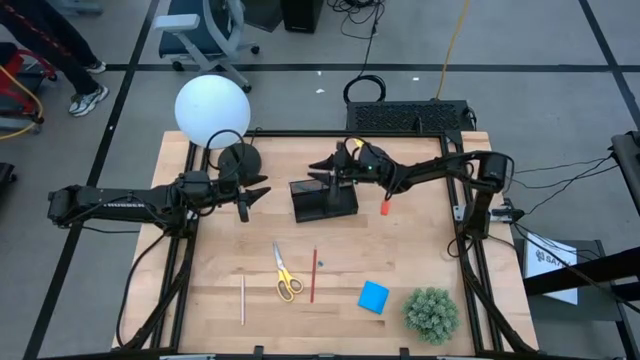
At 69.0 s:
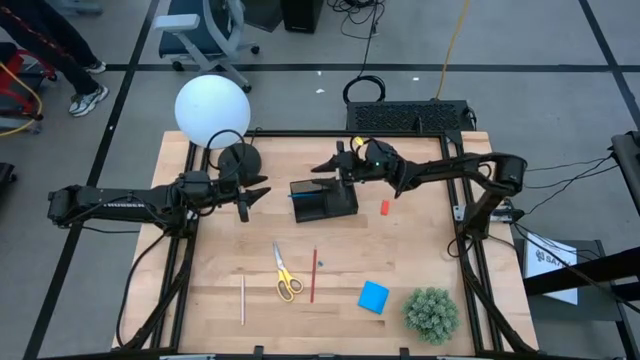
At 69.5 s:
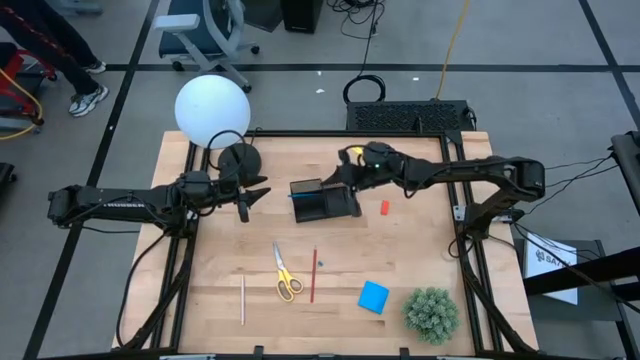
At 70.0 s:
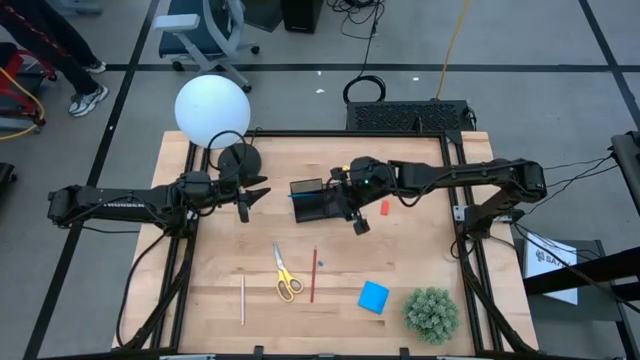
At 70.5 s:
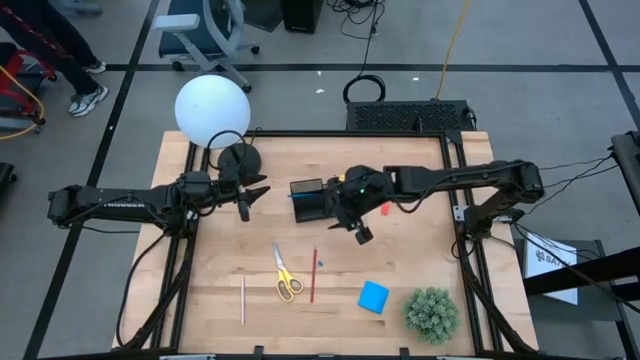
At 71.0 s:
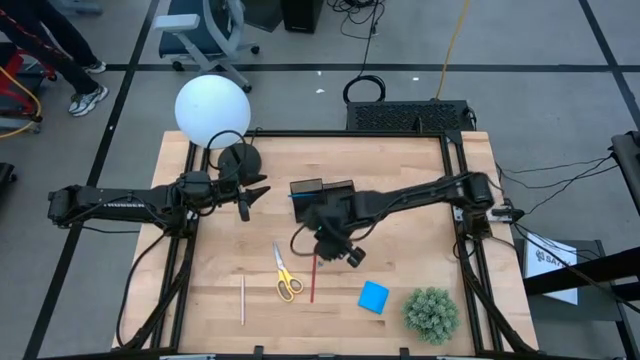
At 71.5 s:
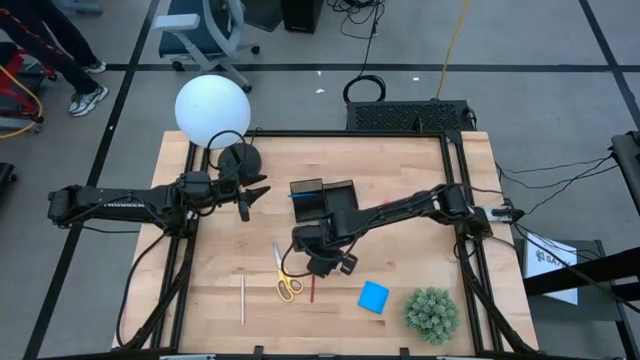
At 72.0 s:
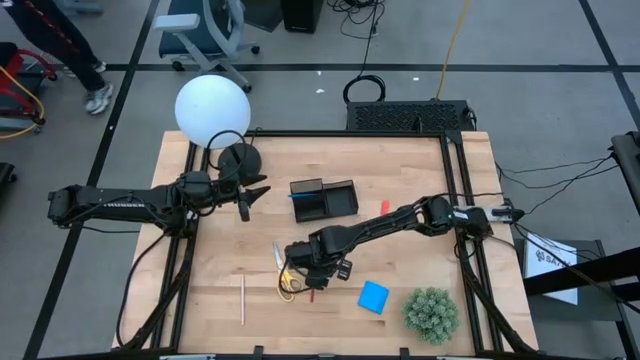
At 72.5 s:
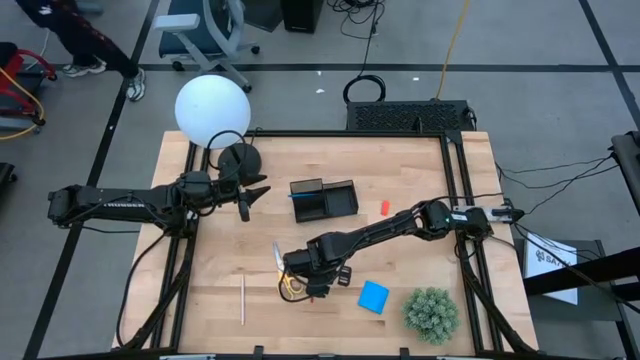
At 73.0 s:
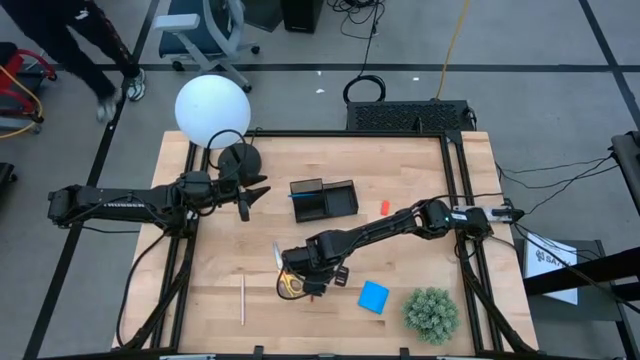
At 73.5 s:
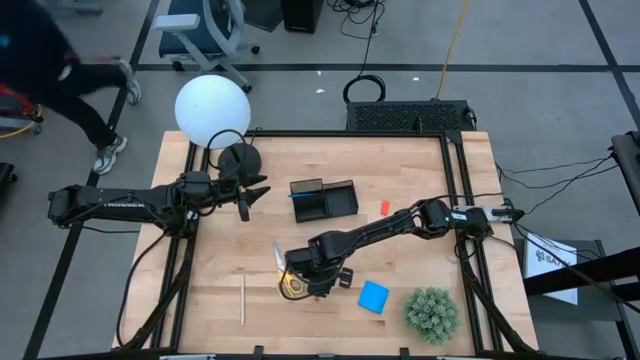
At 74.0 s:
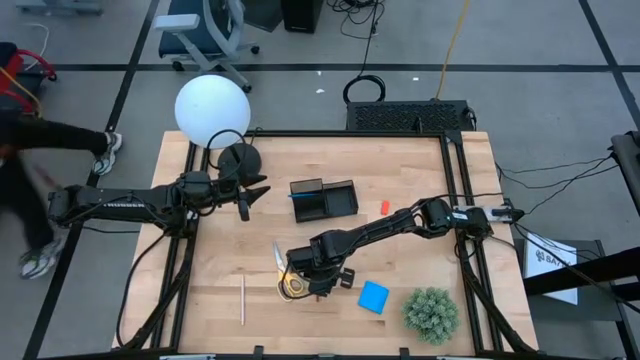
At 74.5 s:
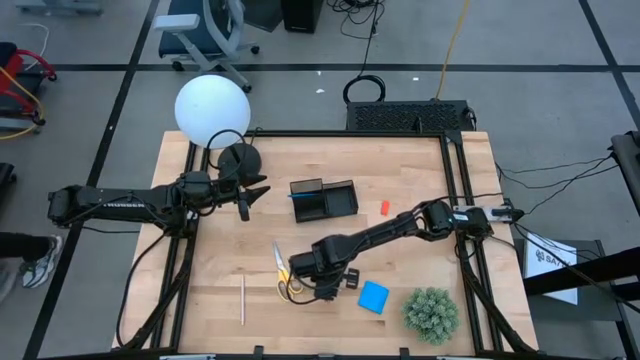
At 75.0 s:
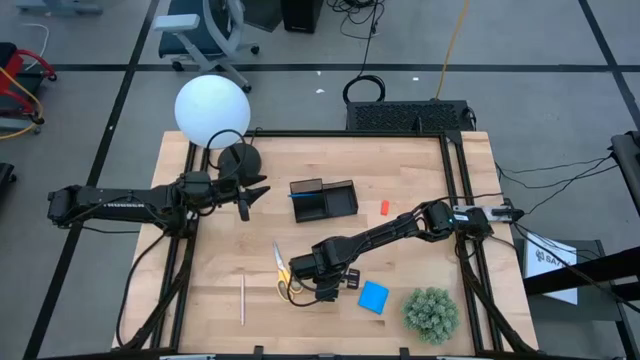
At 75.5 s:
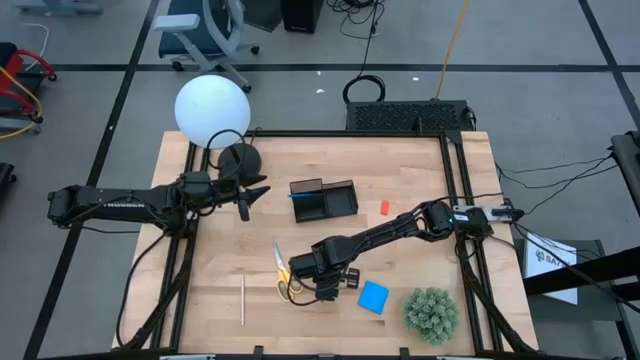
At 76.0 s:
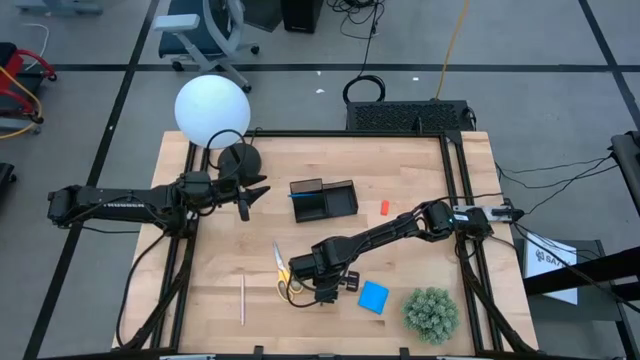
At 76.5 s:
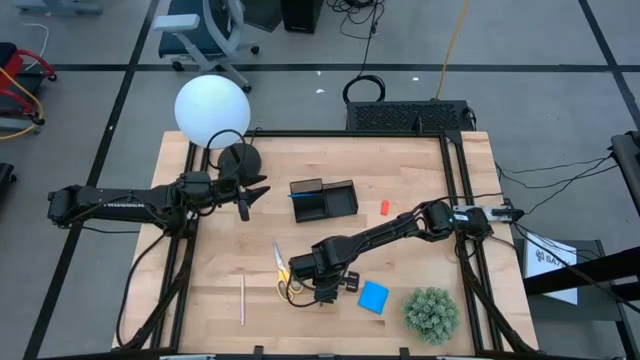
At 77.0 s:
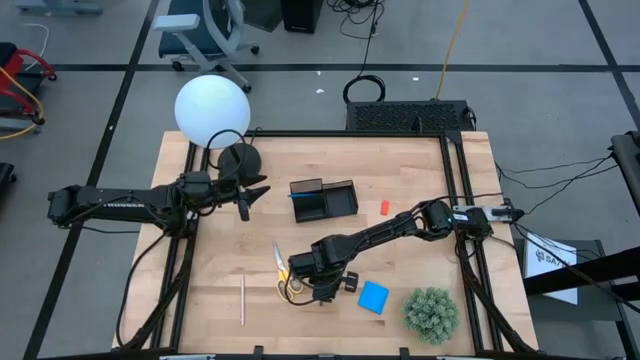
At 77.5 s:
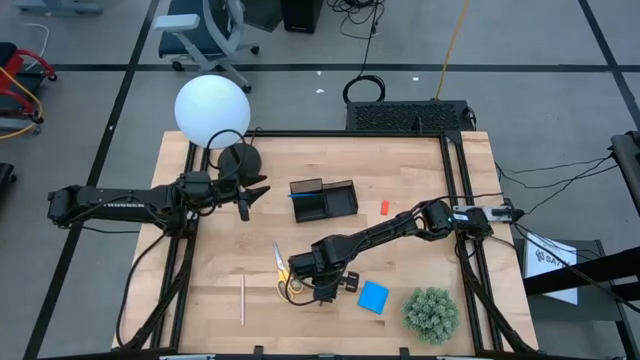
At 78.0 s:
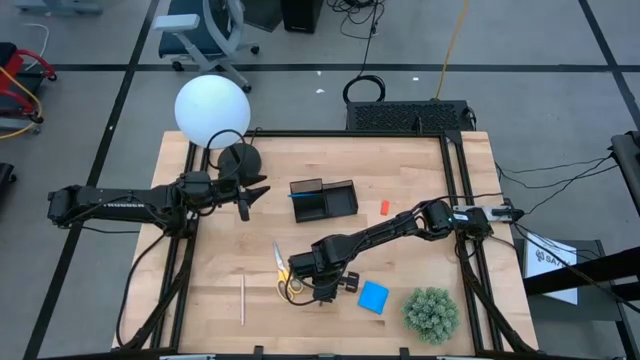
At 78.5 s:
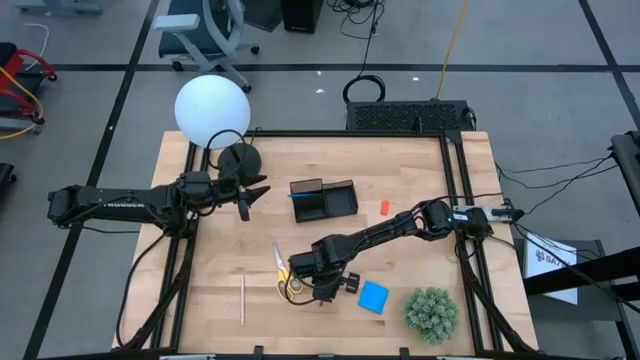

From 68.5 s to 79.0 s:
Task: Pick and place office supplies into organizer
Put the red pencil into the desk organizer

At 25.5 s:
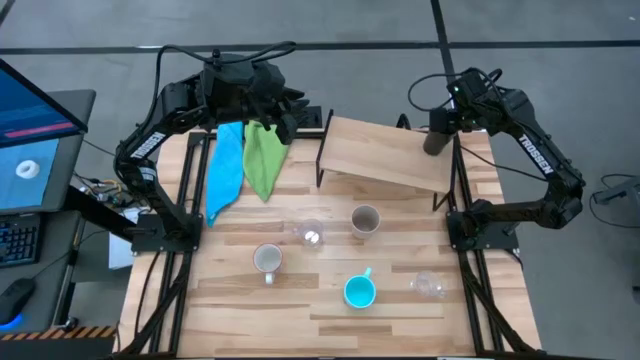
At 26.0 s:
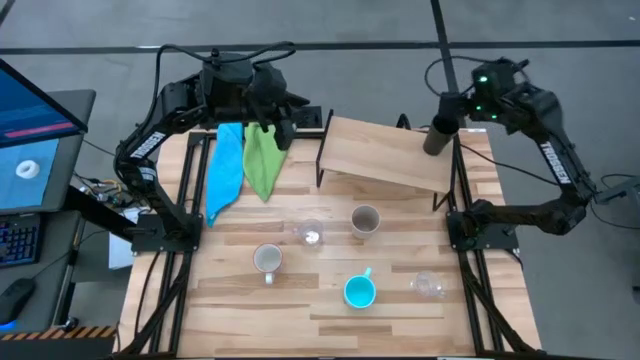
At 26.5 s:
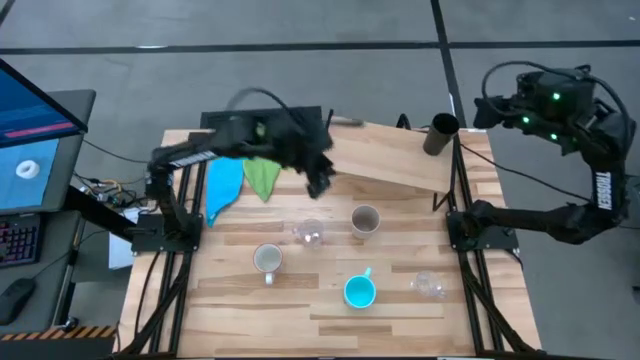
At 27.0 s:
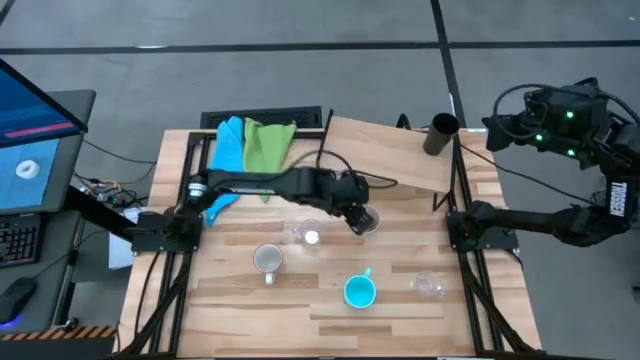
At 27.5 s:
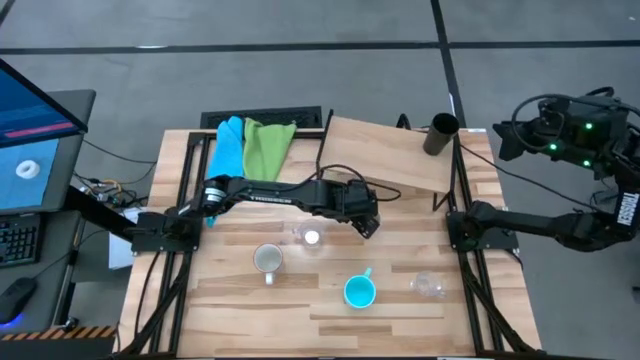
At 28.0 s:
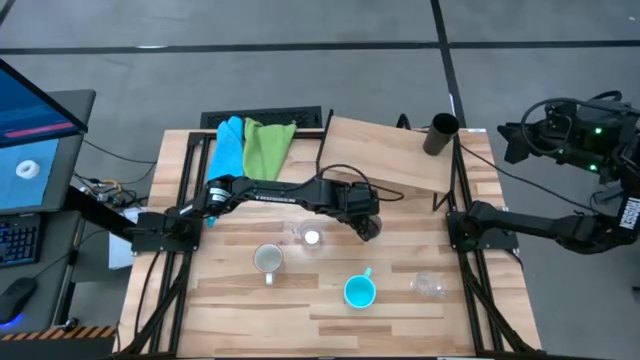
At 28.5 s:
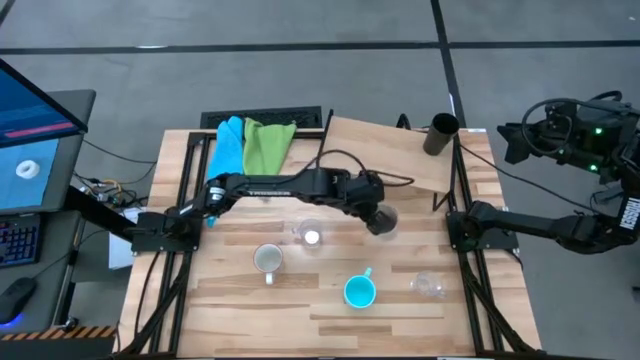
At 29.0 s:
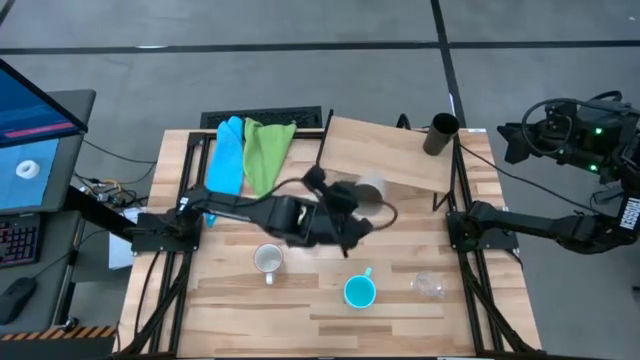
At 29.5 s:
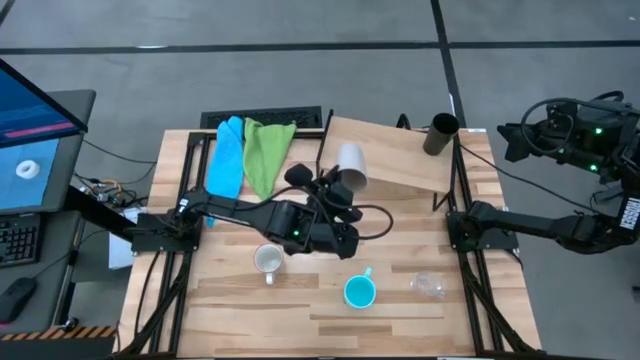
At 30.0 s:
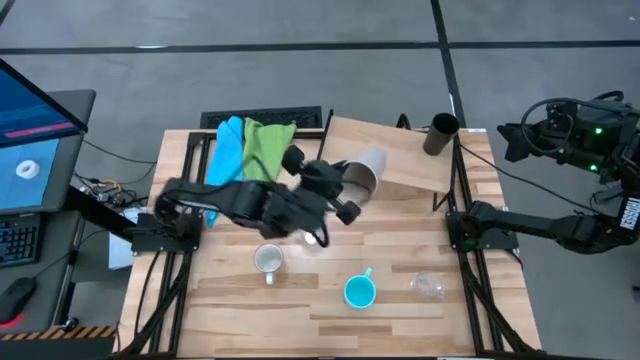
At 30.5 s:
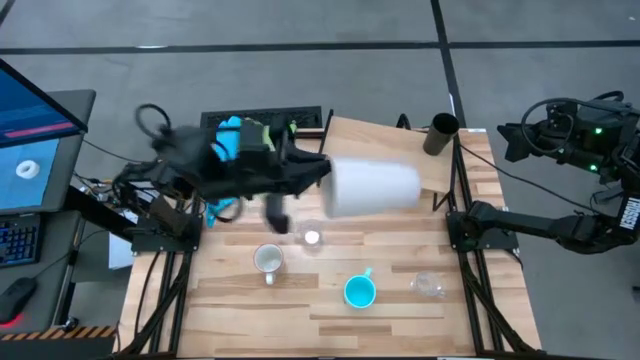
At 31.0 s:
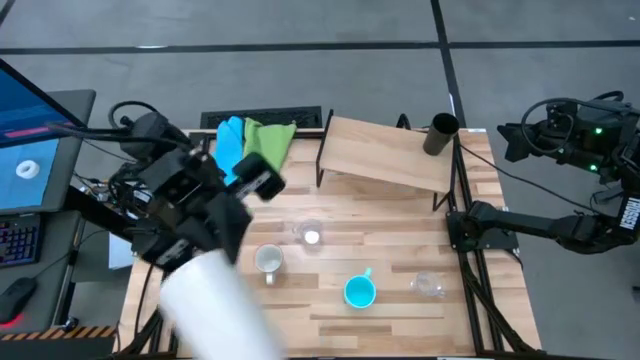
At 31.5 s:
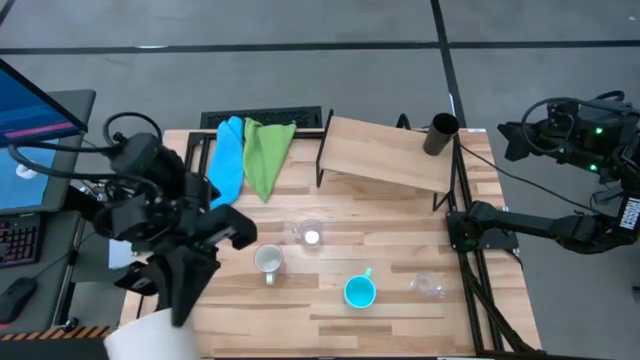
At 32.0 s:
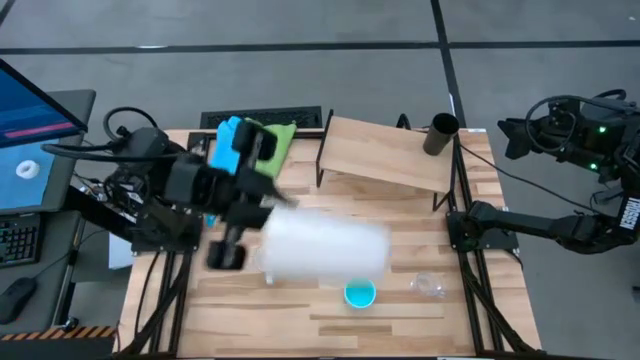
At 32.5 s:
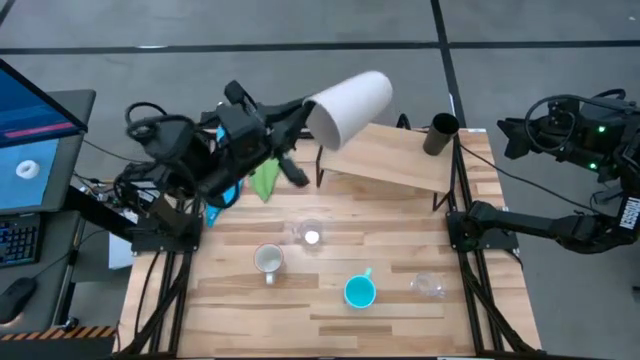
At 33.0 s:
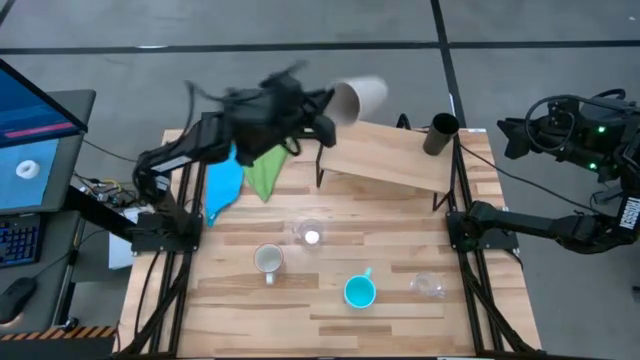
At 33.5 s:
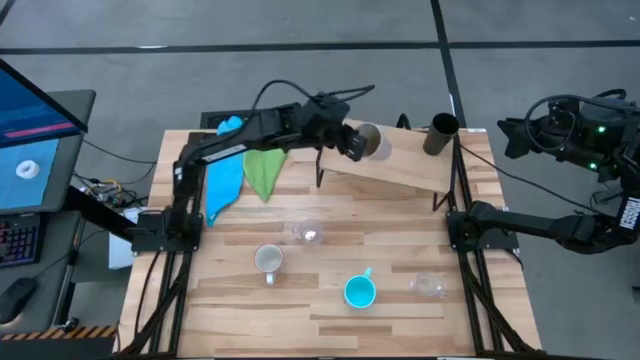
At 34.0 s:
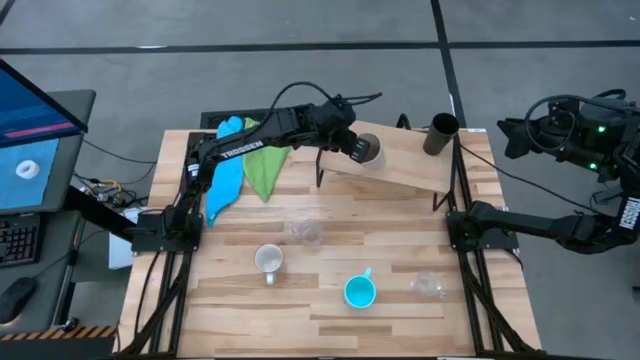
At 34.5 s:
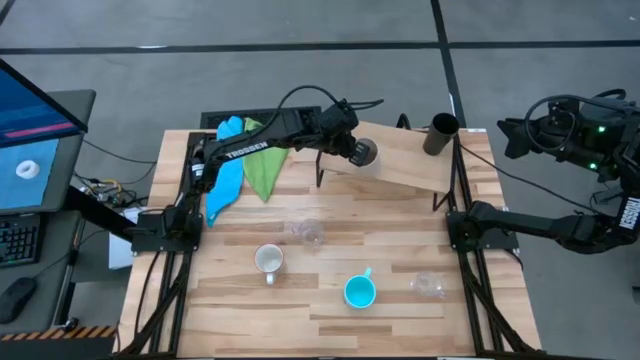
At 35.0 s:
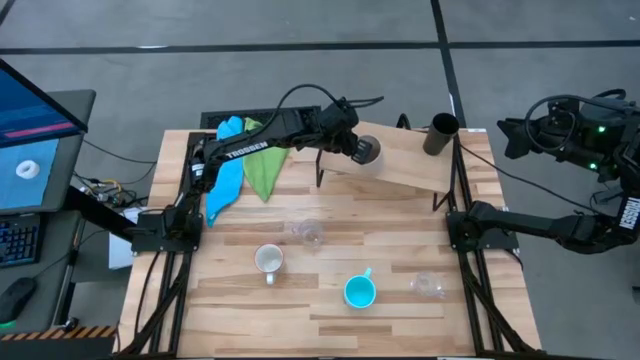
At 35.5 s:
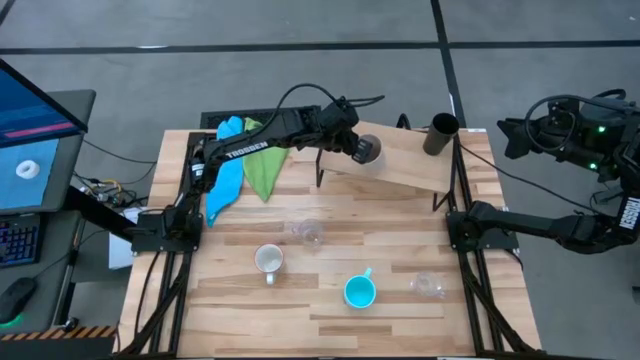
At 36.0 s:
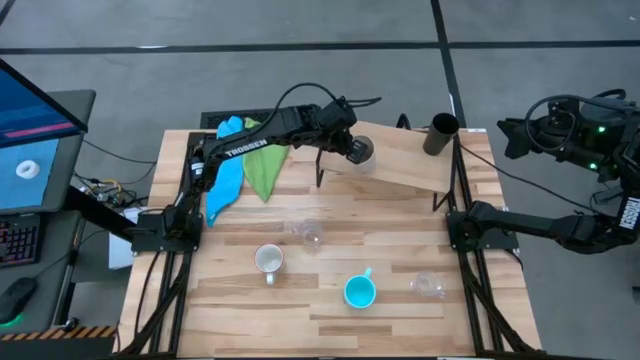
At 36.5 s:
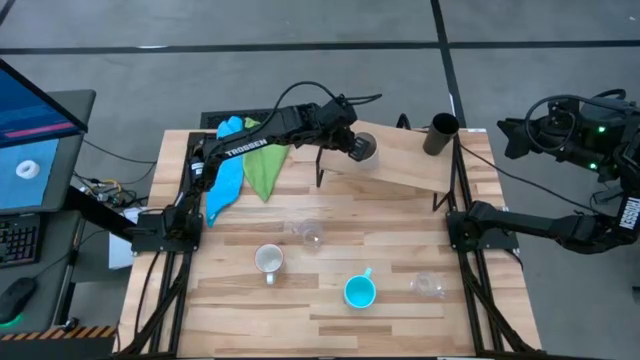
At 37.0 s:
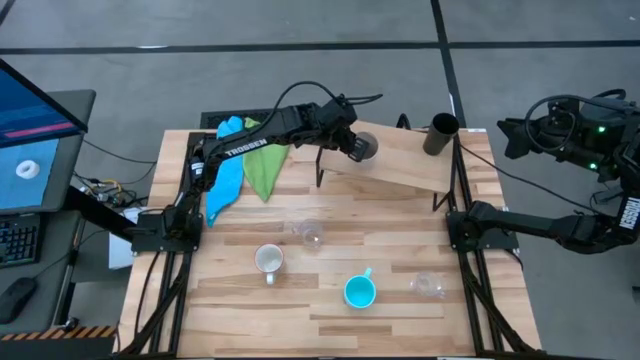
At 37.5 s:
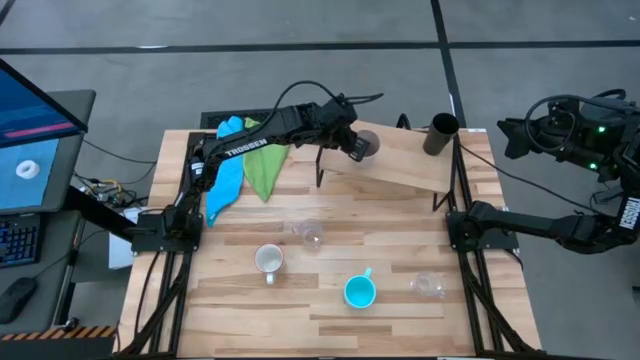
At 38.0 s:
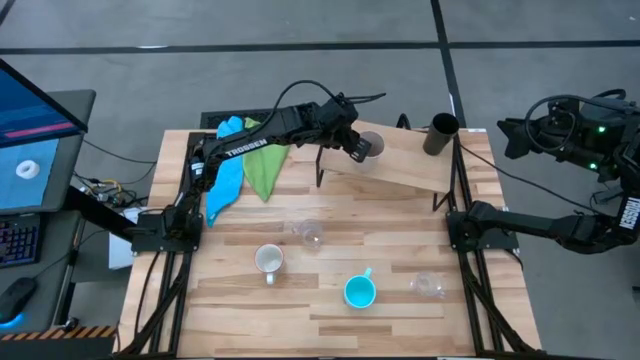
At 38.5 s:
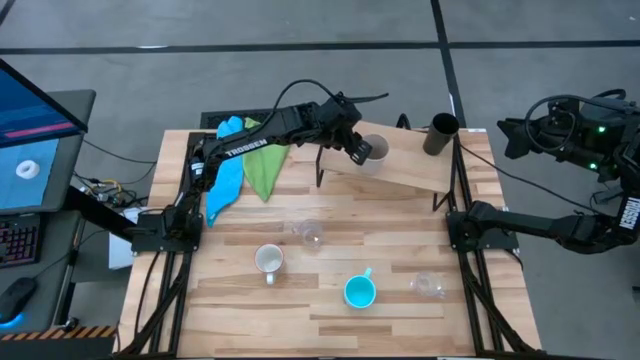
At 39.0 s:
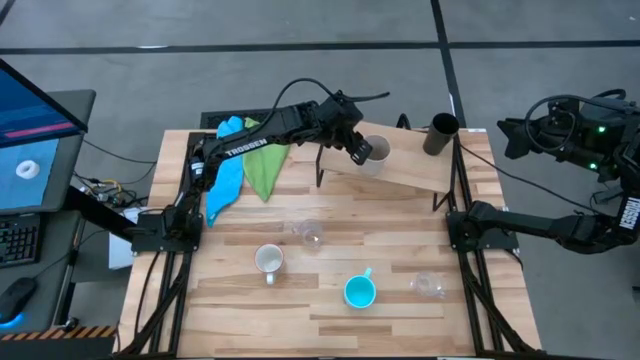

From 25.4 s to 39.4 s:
Task: Stack small to large cups/mugs on shelf
Put the white cup on the shelf
